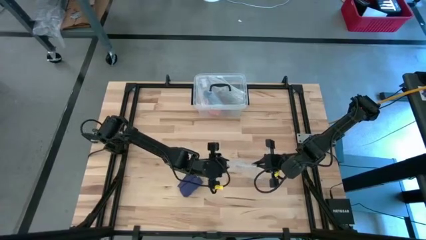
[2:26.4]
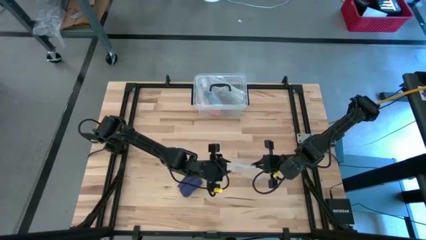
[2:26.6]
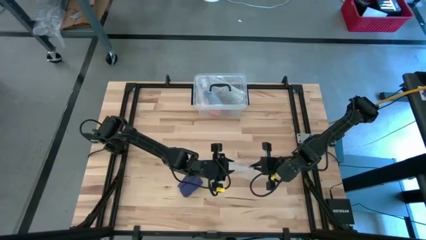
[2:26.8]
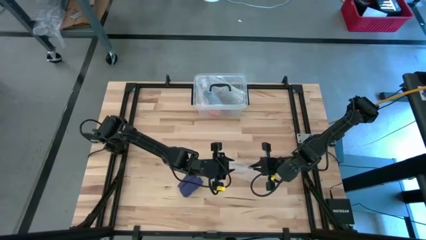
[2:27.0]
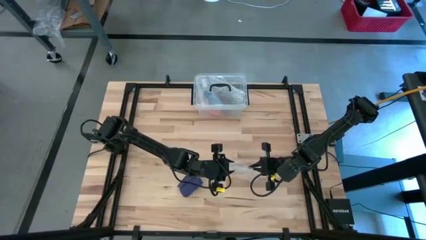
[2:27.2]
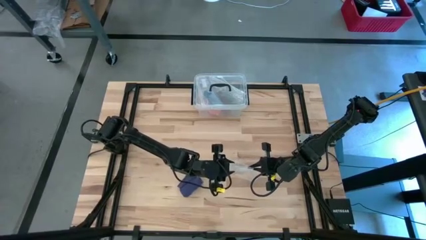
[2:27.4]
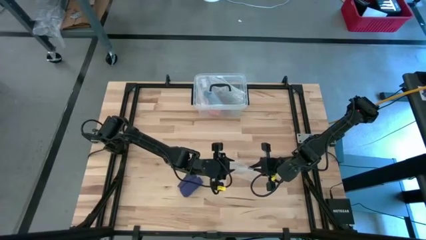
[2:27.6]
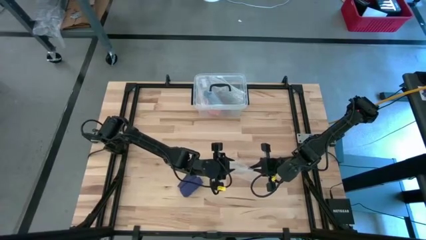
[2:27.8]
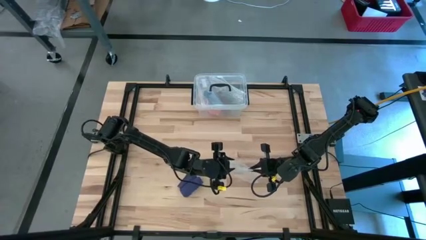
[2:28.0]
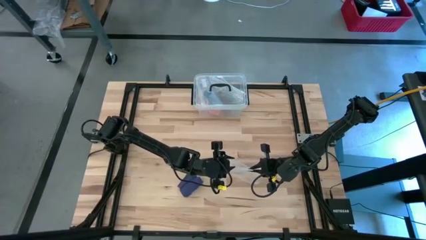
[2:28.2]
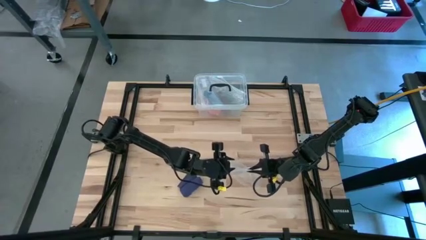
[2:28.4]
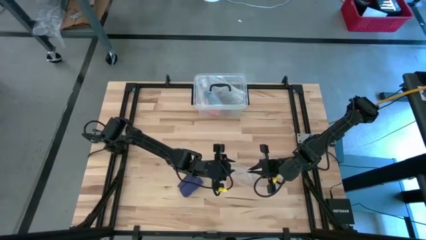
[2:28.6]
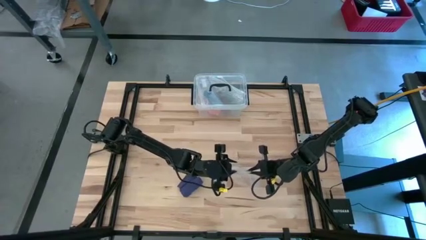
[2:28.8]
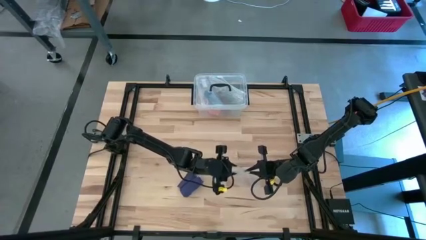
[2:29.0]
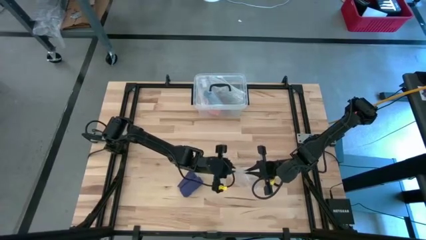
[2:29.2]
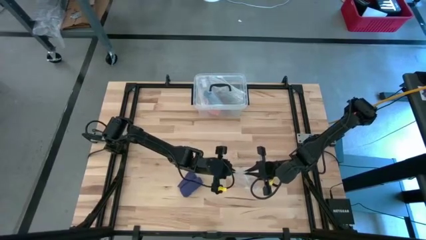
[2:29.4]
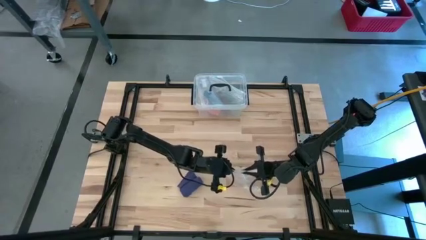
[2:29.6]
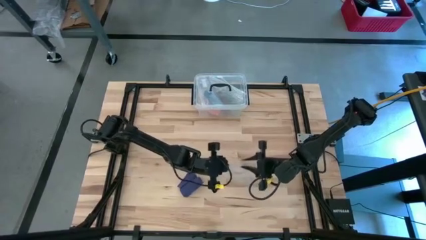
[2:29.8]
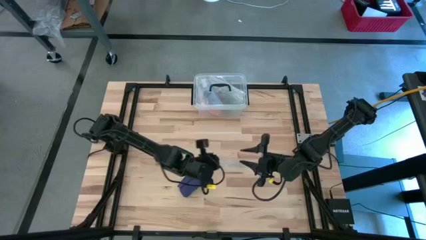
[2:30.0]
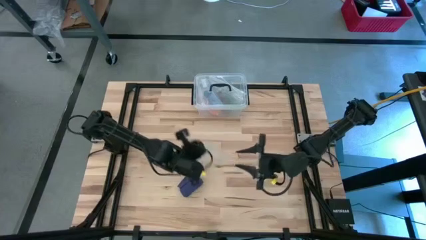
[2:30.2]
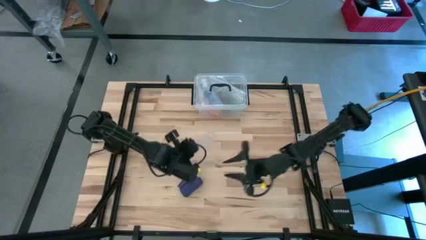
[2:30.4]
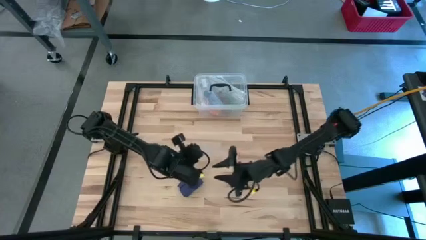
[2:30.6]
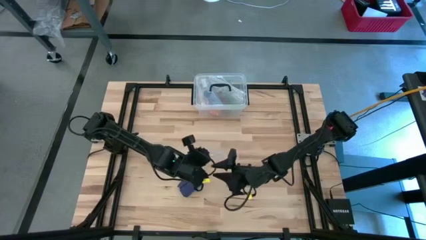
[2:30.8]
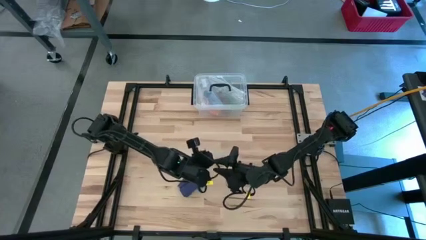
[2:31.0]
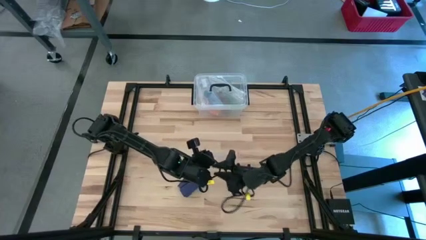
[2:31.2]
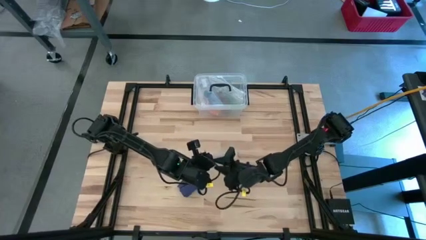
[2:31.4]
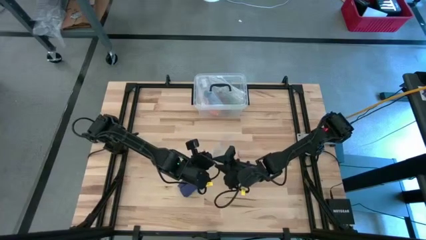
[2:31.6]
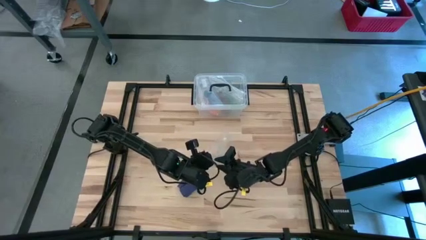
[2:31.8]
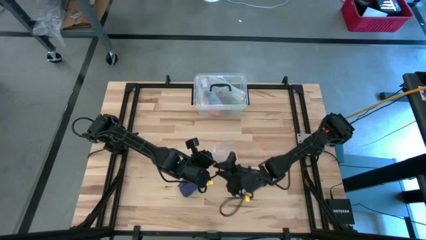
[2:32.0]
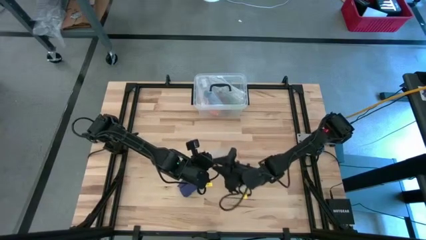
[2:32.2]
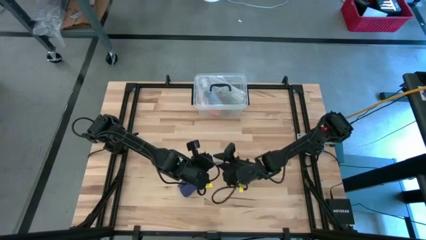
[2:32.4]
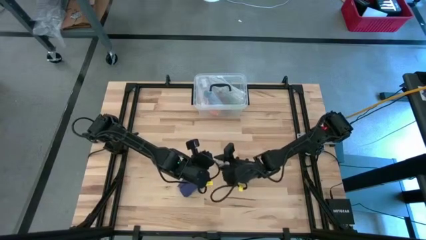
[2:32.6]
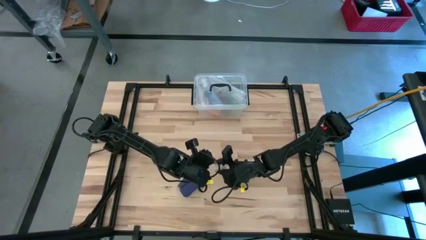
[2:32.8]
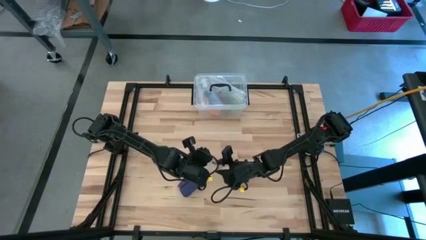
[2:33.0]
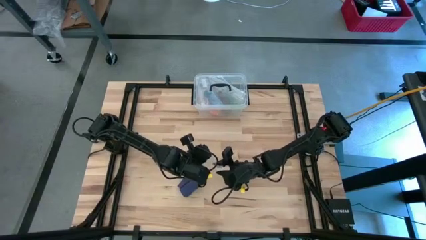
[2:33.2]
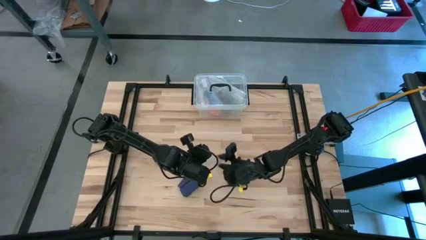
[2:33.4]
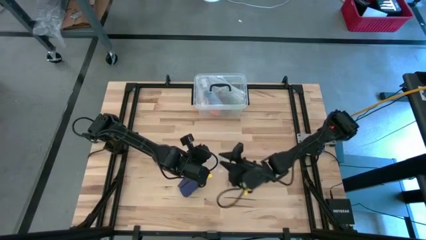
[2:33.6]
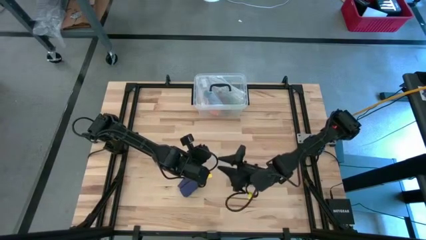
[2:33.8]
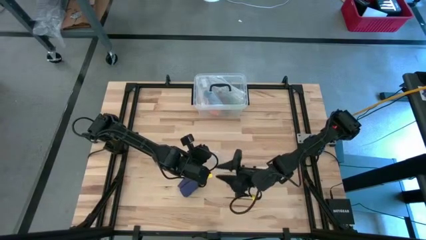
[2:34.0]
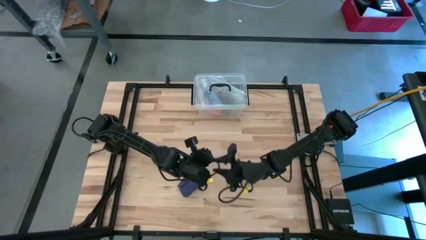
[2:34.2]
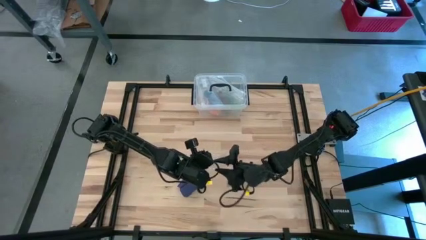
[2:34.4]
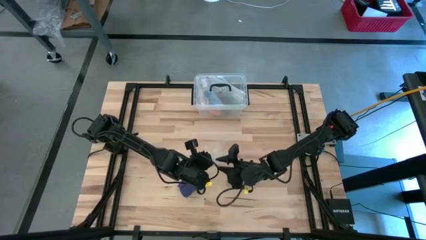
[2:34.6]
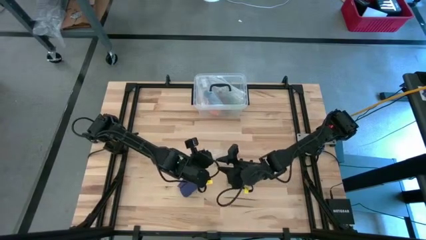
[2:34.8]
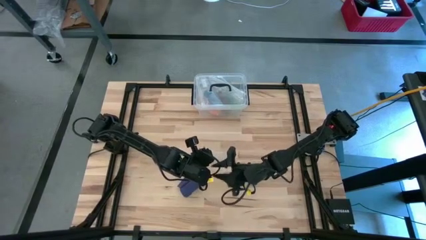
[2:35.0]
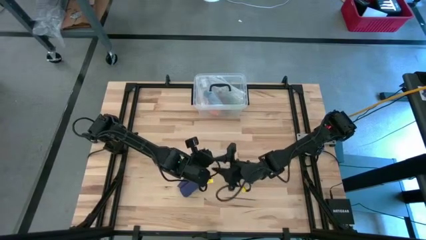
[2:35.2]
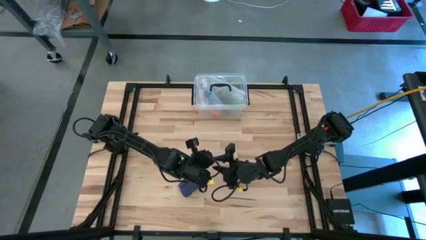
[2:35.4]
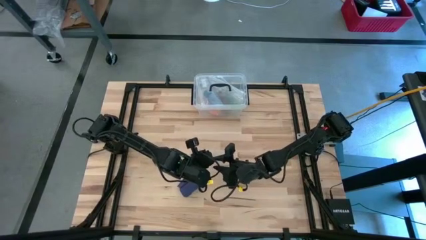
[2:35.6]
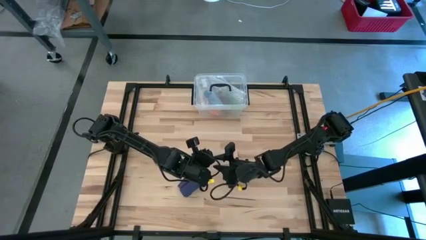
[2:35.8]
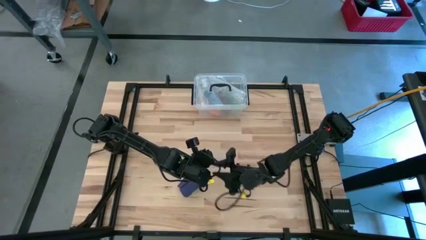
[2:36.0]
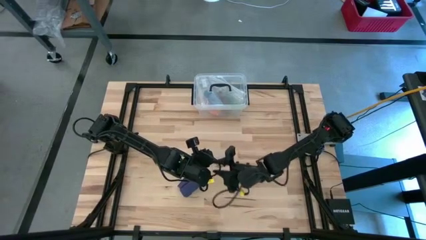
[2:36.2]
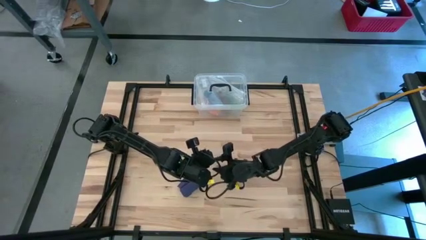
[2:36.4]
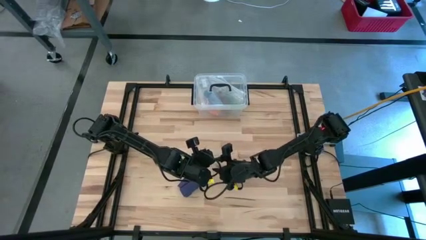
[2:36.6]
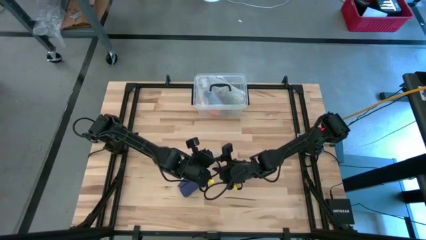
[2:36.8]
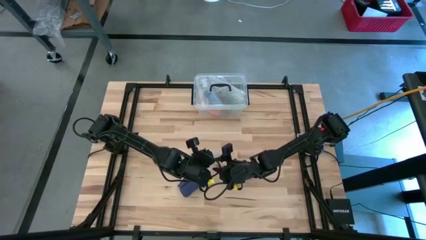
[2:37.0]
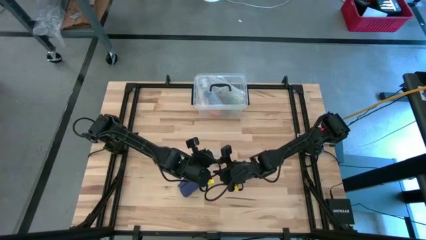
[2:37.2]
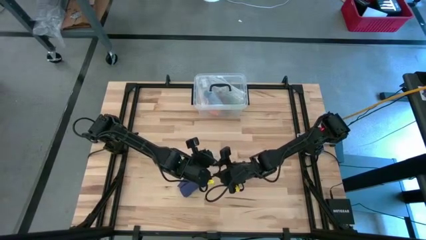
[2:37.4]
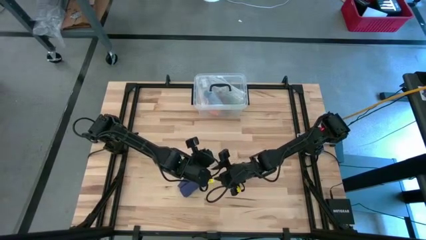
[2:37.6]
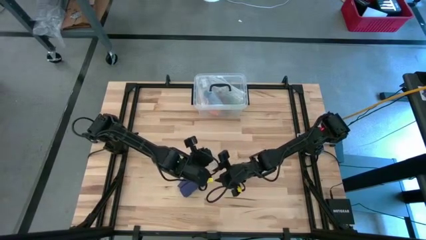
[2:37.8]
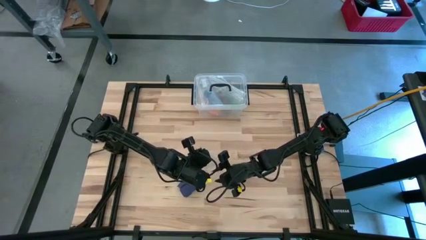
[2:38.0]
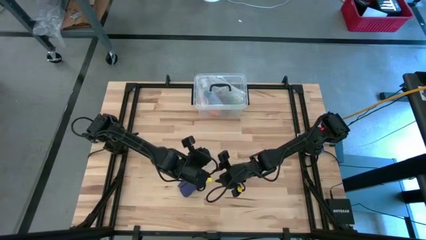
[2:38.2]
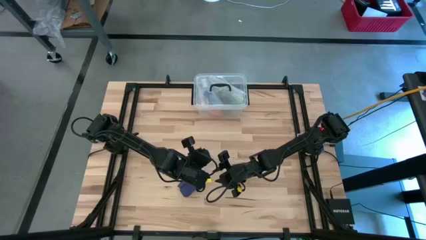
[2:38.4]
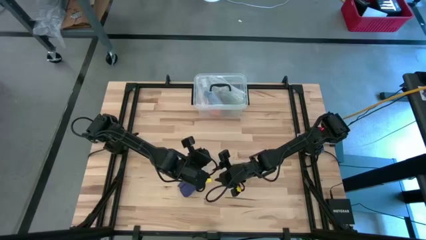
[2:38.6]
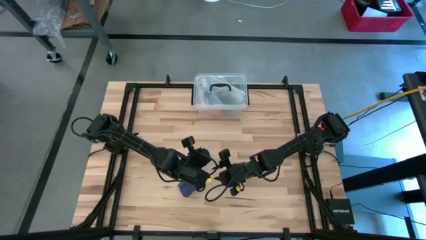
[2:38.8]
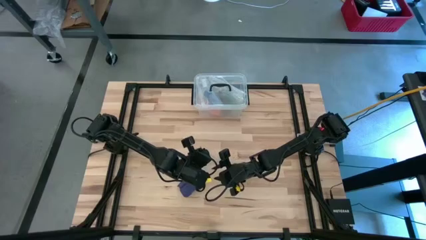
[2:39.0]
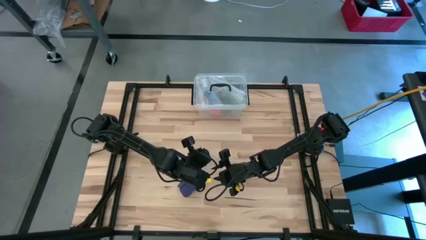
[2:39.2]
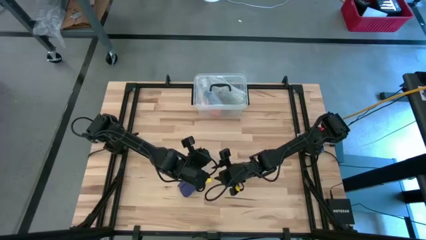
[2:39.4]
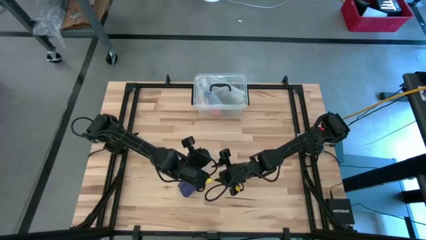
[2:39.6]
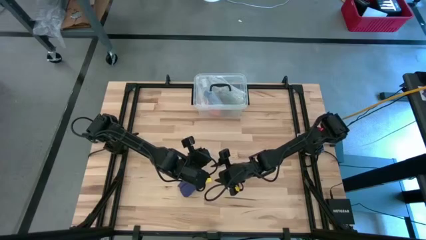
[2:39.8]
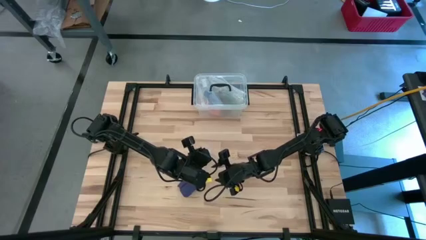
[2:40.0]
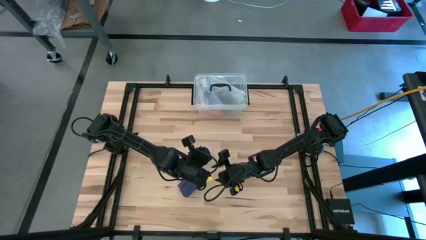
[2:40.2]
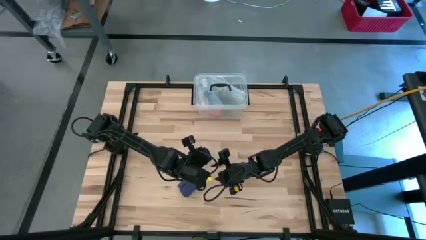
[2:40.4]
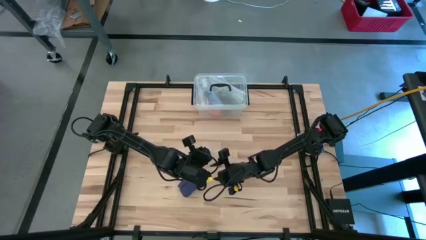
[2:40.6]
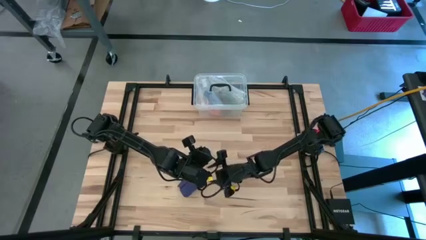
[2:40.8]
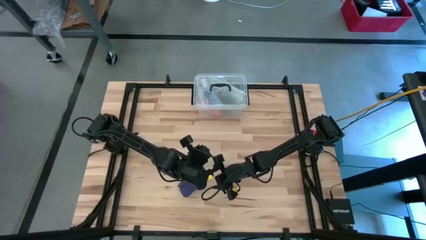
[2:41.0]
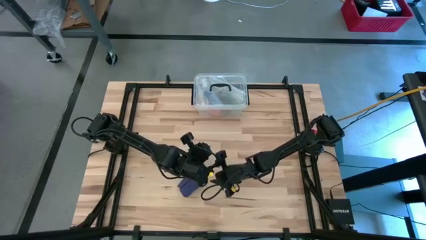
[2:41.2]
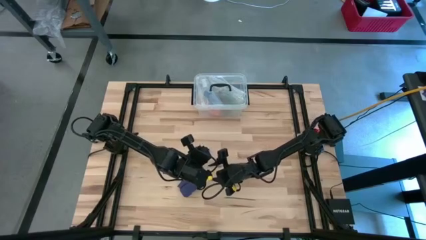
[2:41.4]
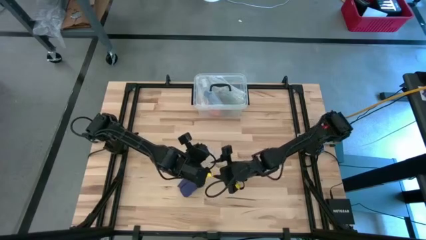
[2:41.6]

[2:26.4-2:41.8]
Task: Roll bandage
Open the transparent zip bag

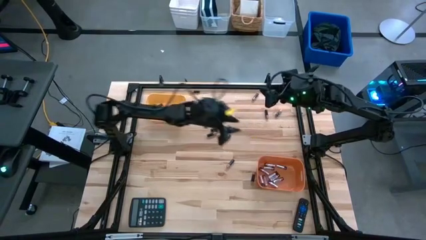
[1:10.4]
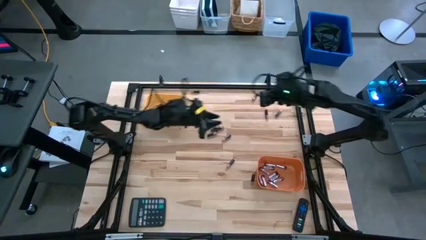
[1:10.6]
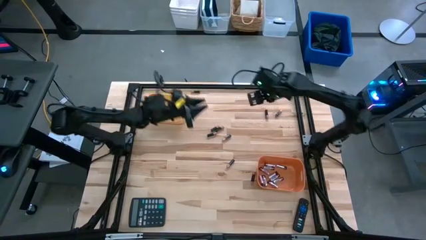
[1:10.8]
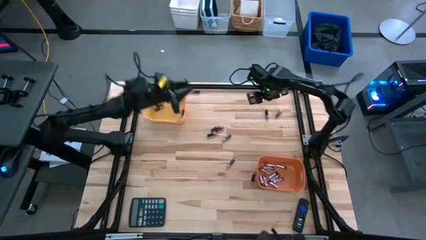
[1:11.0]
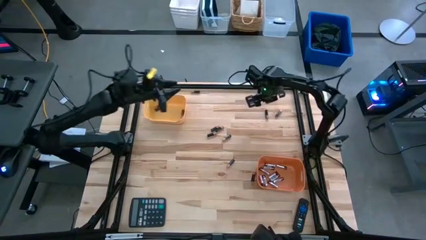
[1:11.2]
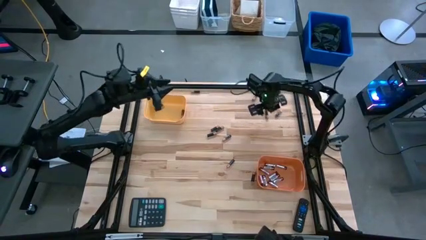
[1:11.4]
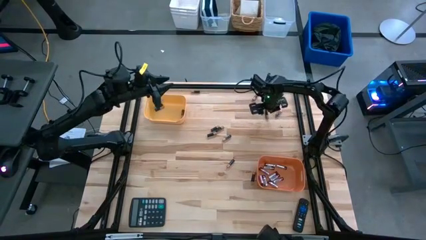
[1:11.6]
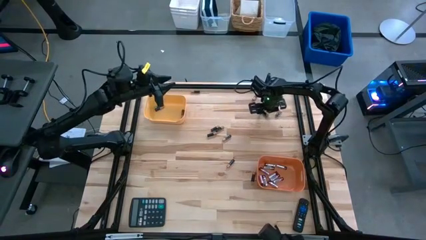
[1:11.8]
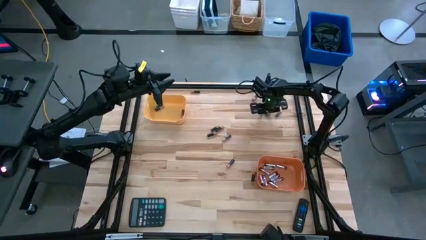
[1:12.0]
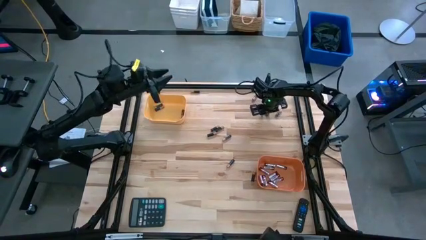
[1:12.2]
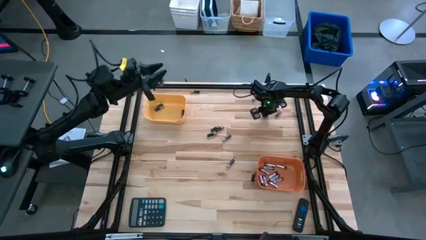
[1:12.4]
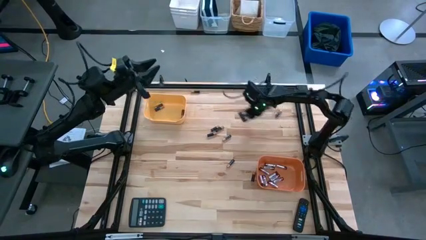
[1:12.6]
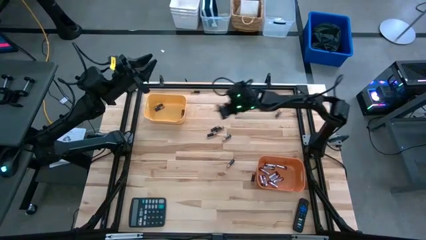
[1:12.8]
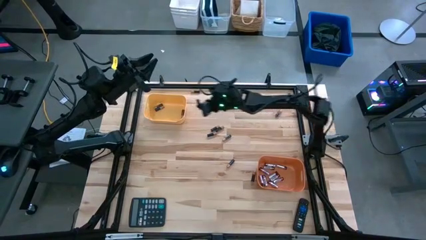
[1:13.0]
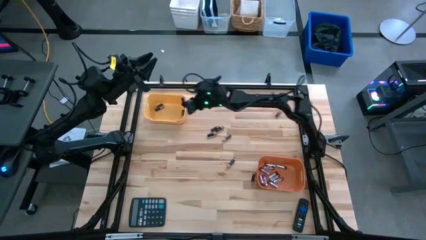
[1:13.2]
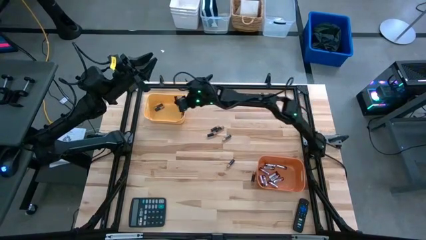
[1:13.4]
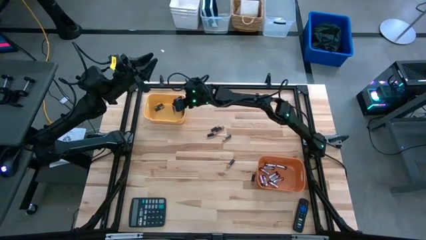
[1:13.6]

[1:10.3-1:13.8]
Task: Sort batteries
Put the black battery into the yellow bin
